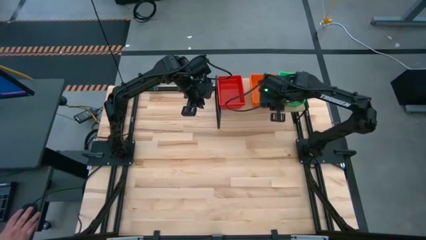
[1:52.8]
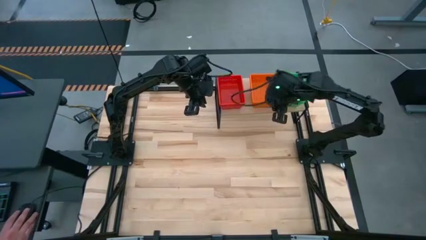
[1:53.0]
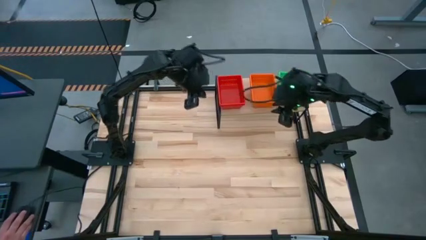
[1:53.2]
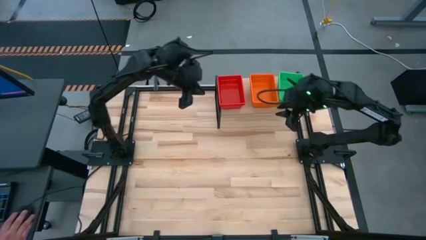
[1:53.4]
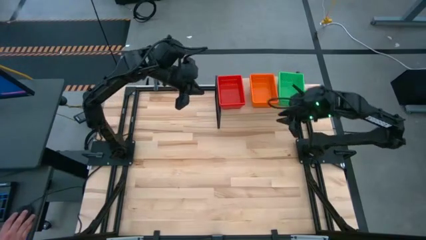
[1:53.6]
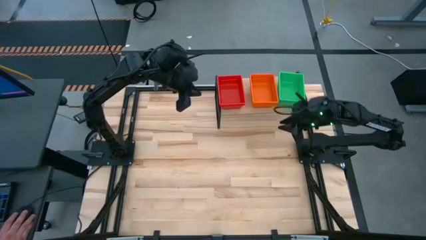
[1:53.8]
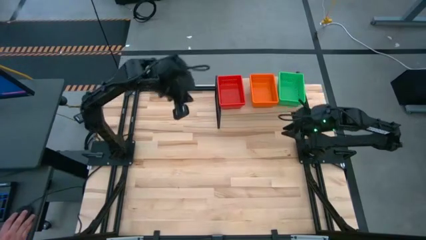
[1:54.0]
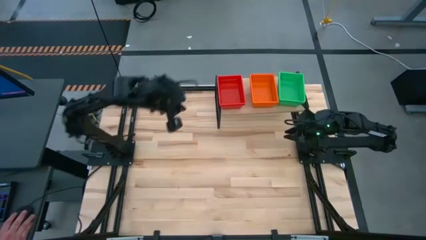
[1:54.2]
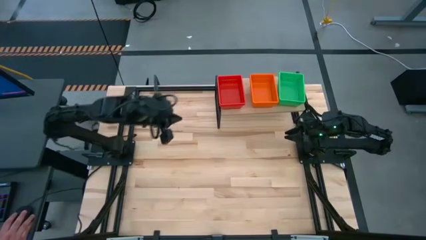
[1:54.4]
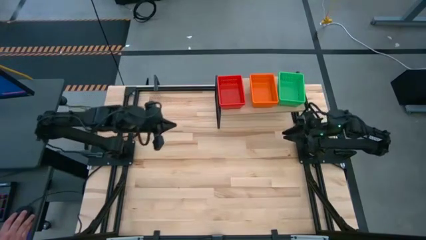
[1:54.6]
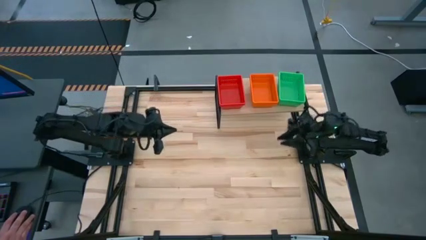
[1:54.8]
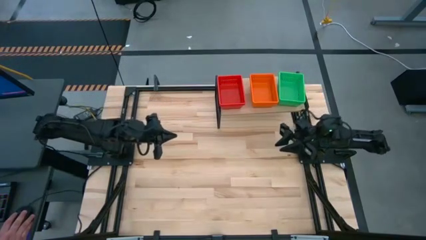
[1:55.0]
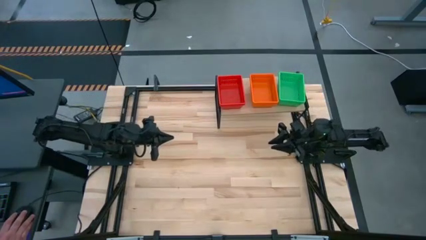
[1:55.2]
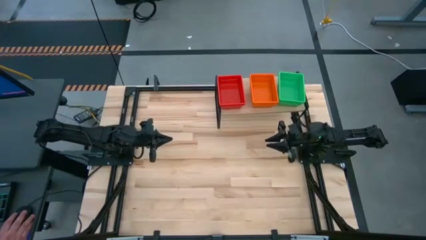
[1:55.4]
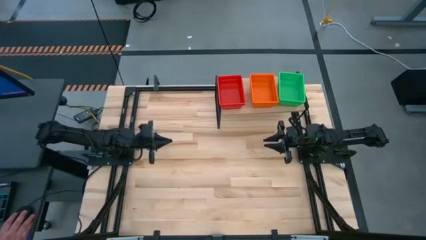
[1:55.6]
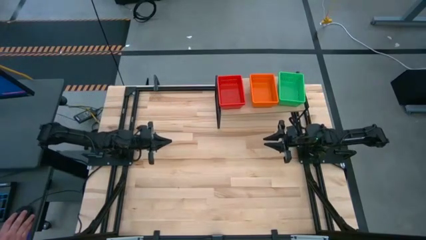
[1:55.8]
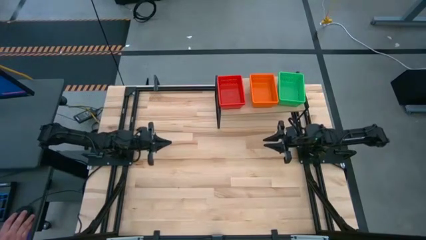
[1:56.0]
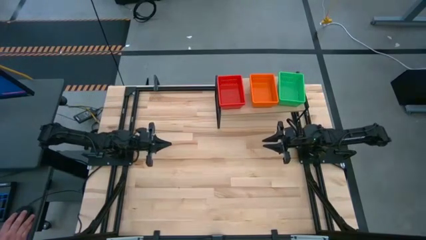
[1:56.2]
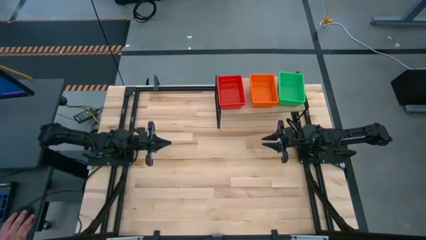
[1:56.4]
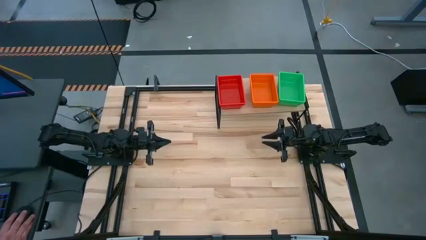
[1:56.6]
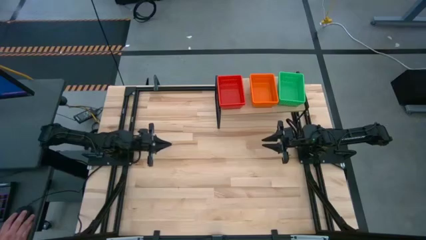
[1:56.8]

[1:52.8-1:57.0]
Task: Stack baskets on shelf by color
Return to Home Position

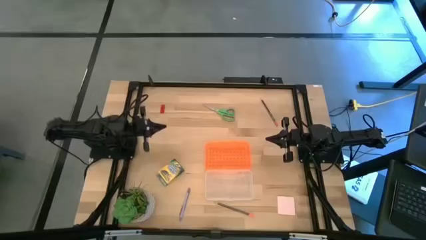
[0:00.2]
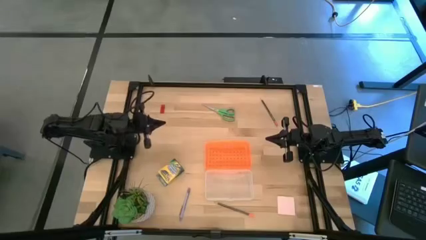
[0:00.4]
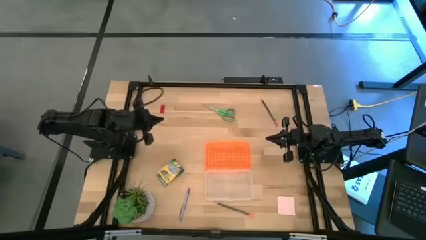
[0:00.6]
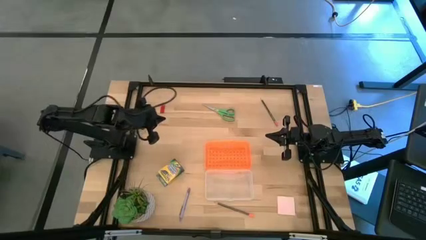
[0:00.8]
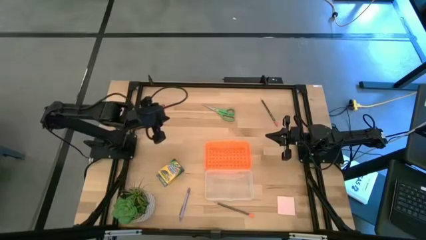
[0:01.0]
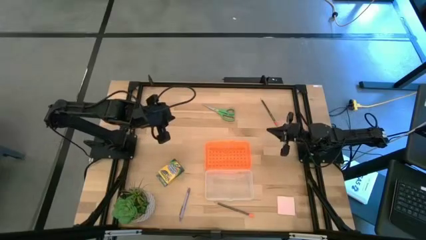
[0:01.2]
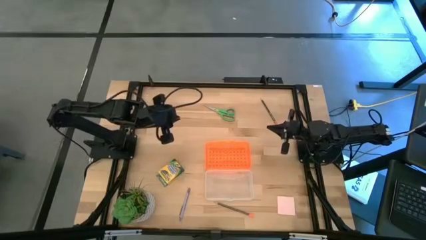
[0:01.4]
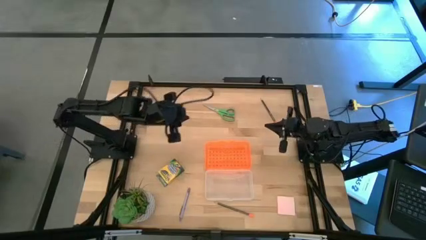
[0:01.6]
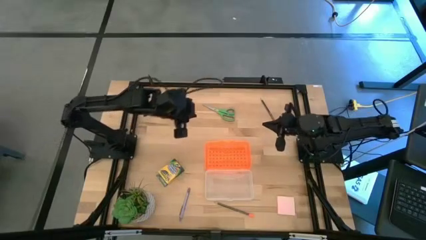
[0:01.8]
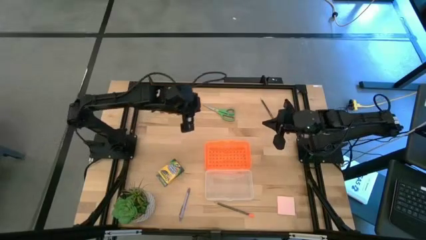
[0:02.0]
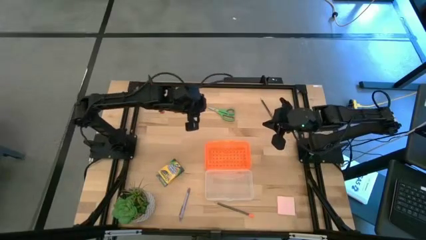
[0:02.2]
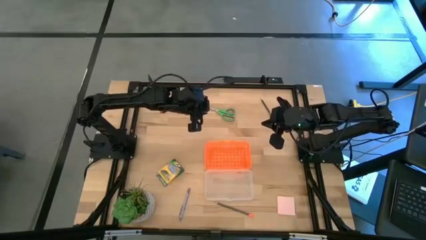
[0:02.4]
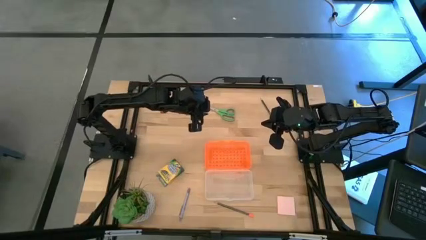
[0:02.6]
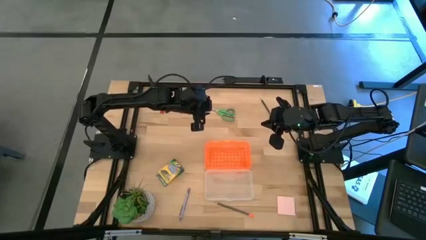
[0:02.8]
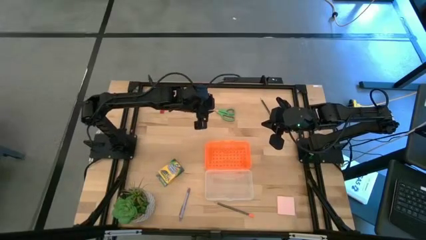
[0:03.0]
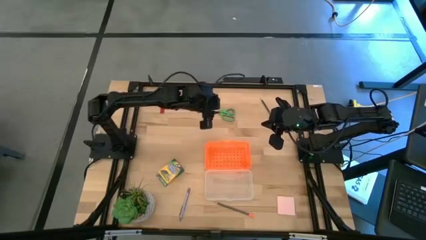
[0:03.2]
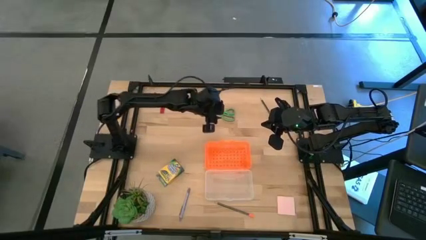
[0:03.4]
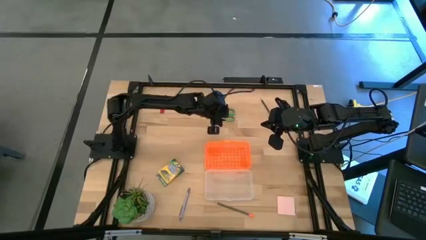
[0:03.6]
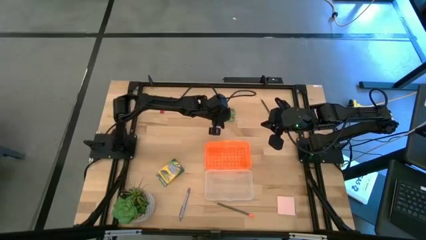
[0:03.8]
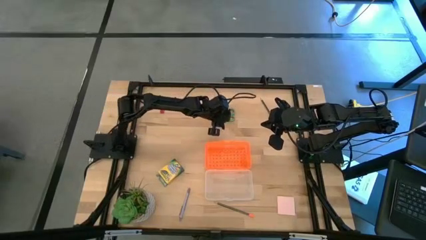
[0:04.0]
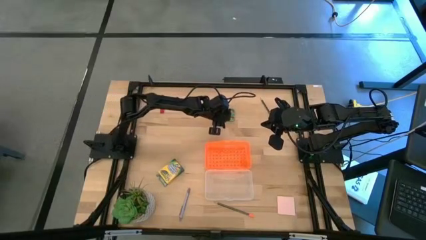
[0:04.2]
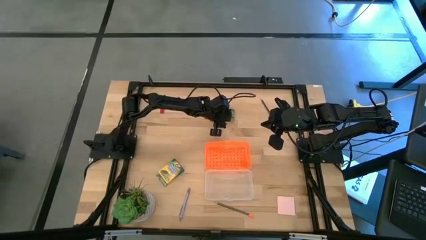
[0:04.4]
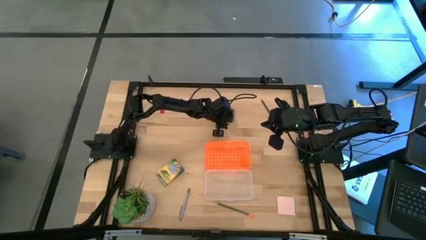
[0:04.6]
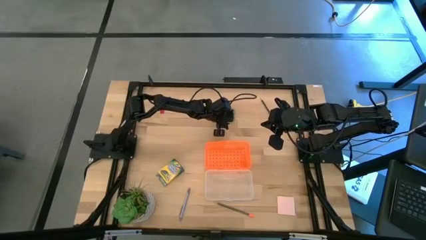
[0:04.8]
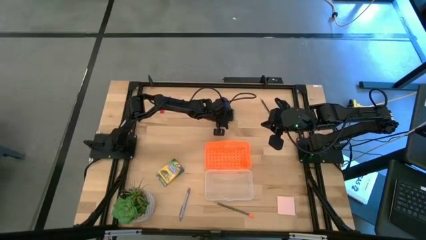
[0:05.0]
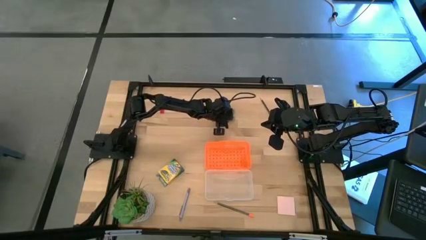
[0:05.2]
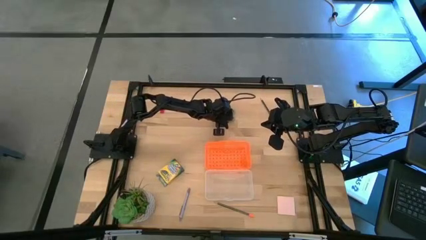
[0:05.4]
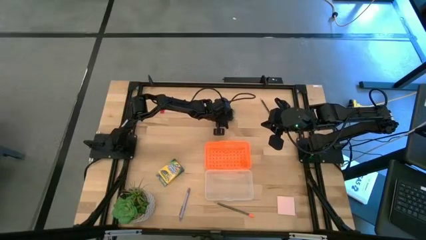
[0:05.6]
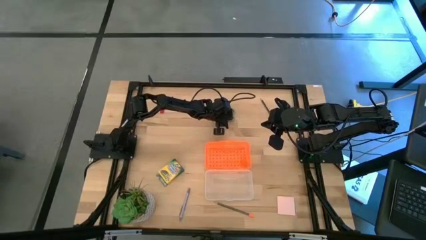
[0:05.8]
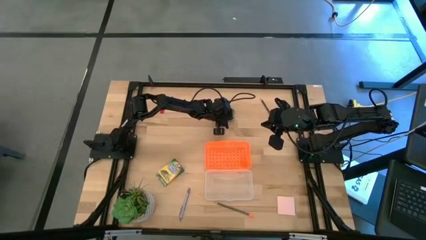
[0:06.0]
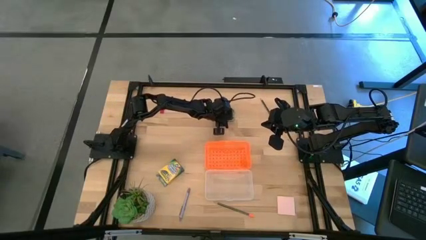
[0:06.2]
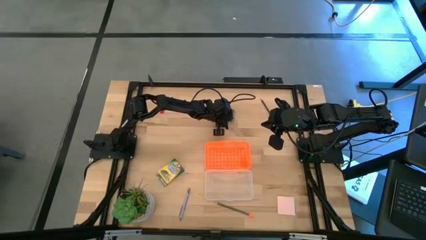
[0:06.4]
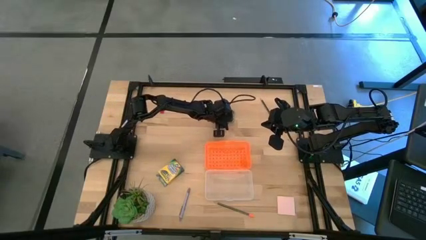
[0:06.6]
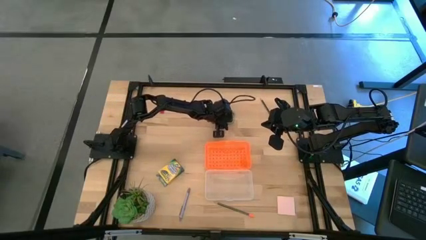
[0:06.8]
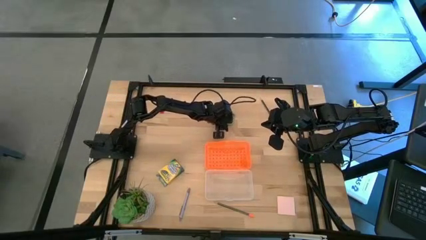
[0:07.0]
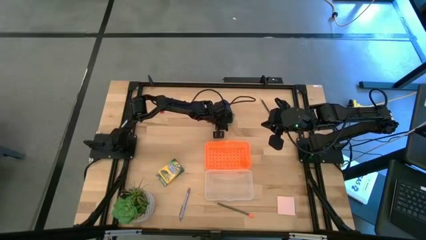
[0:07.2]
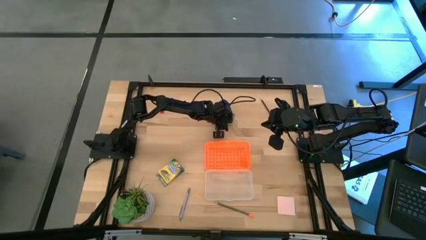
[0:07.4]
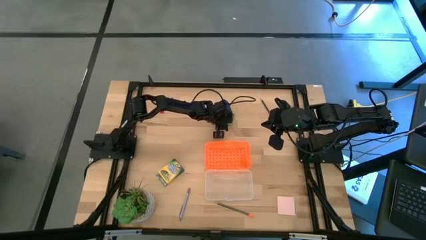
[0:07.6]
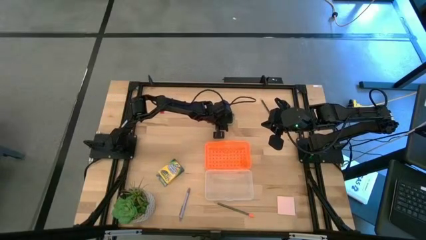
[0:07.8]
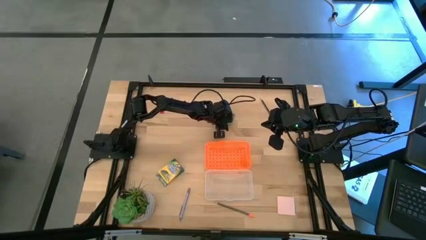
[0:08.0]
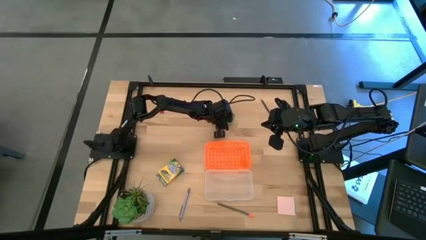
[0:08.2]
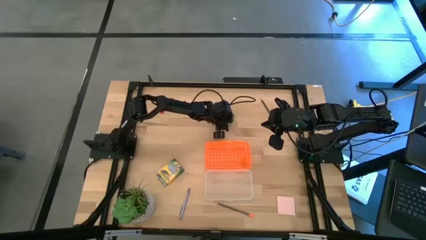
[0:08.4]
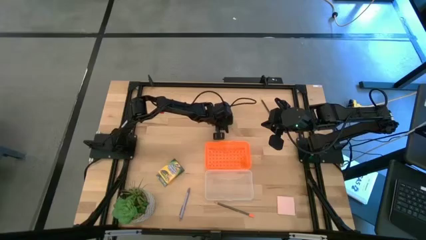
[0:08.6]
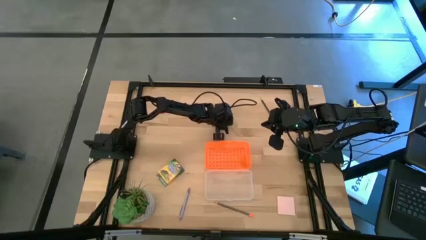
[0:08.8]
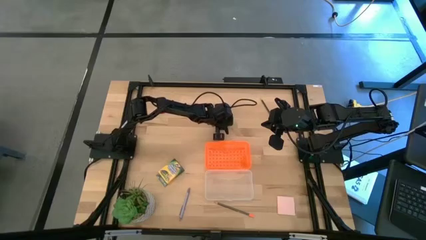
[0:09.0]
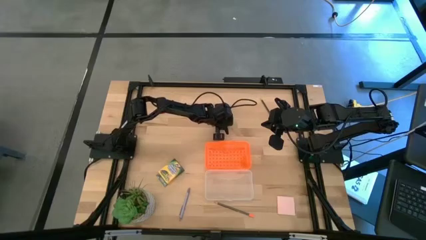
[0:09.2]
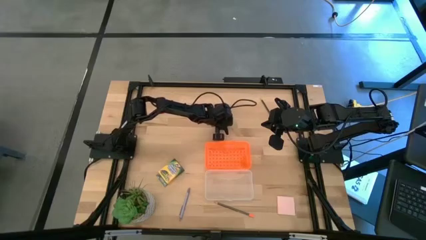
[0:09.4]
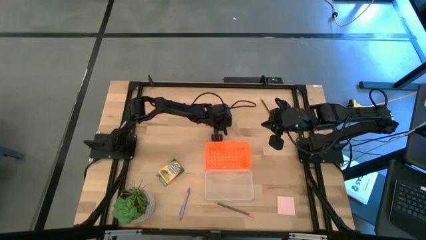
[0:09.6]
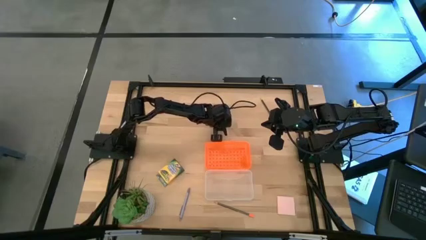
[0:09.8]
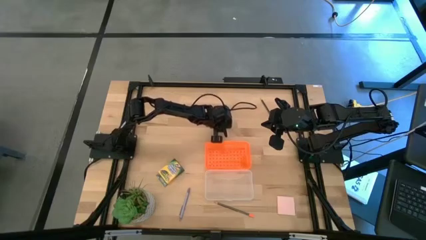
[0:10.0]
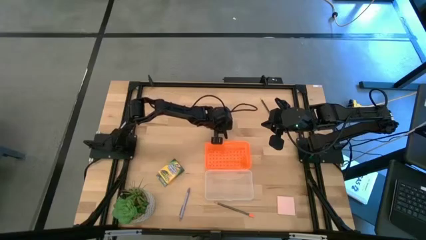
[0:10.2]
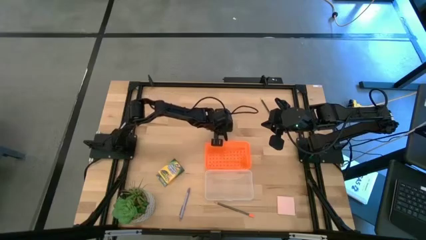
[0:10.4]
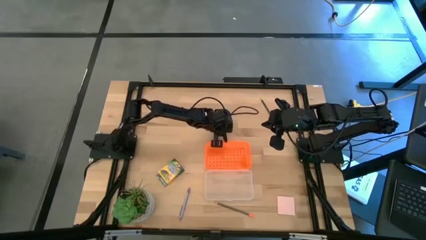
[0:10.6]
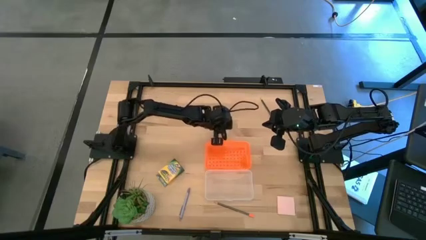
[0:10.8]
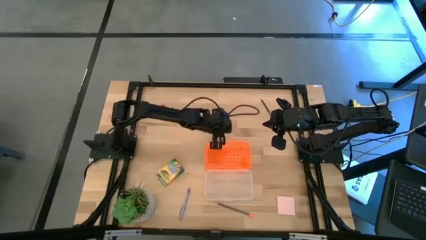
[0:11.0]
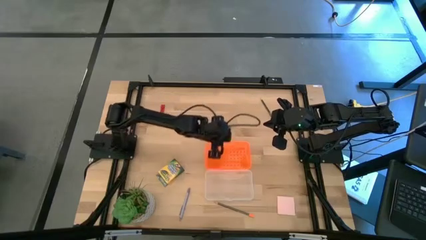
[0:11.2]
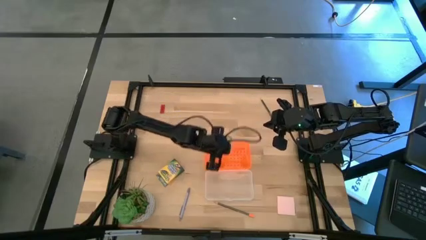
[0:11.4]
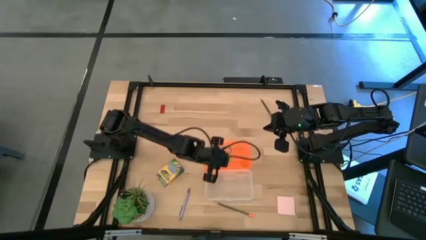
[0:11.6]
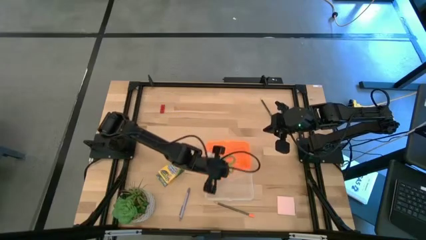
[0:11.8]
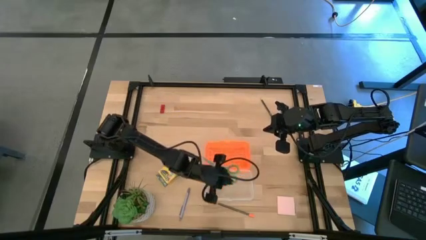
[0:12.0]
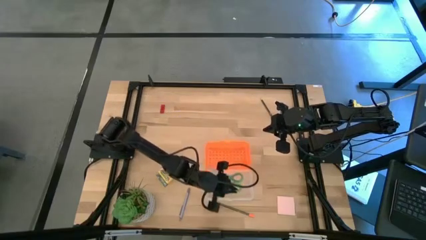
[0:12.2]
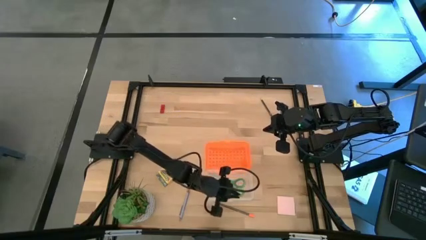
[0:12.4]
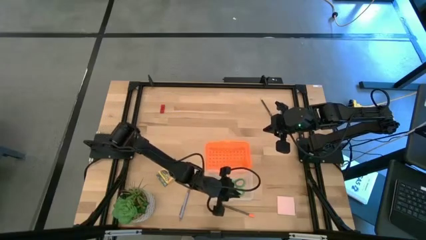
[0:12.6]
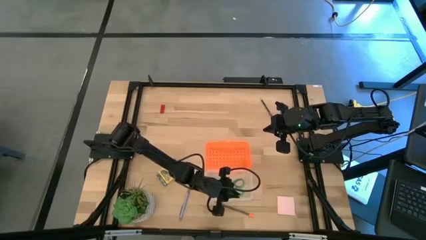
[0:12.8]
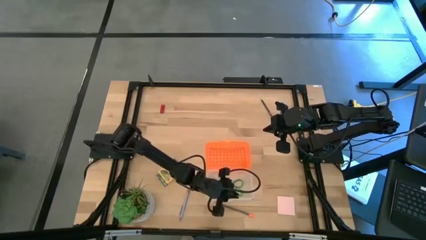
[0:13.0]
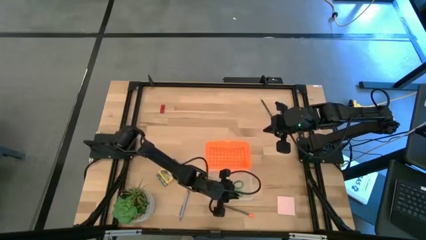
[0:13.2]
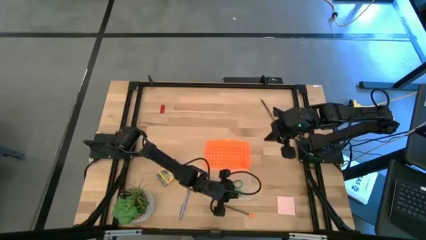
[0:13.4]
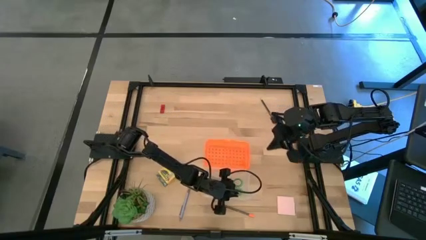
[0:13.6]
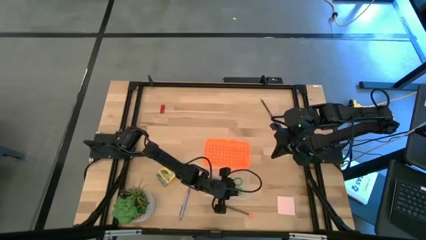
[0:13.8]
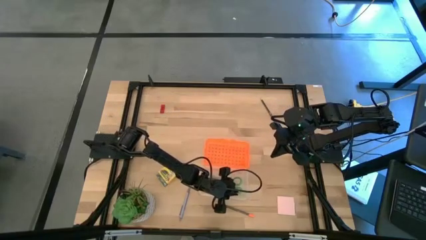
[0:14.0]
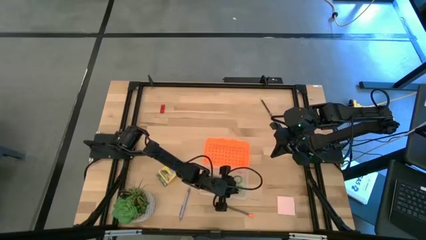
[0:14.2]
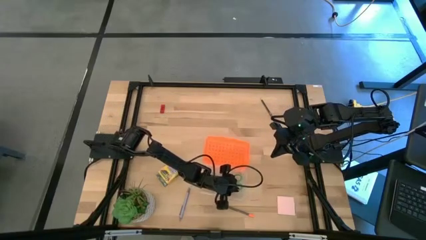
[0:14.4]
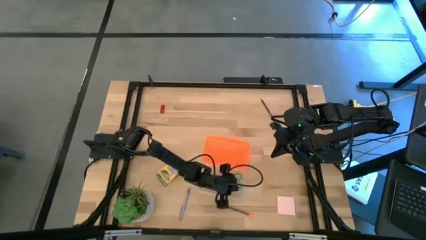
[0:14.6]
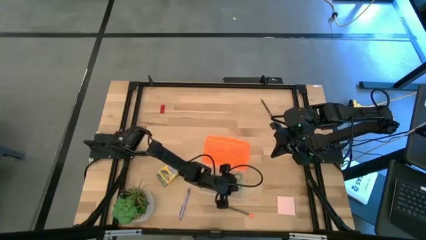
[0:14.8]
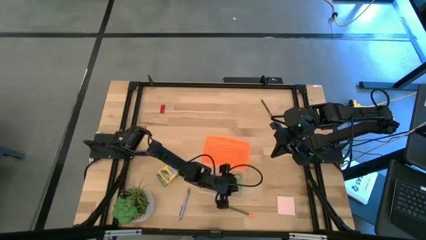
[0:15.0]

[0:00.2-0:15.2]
Task: Pack school essentials
Put the green scissors into the orange supply box
